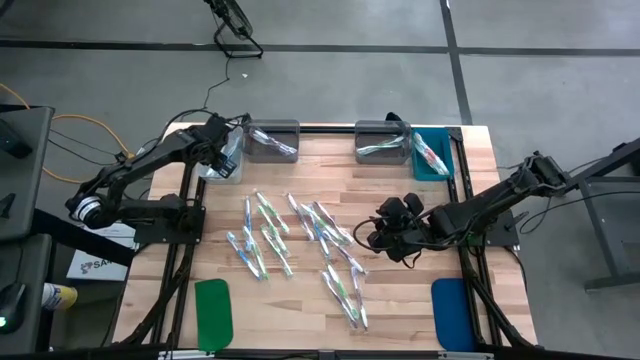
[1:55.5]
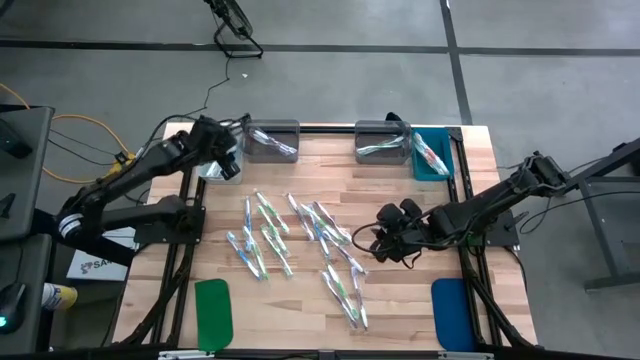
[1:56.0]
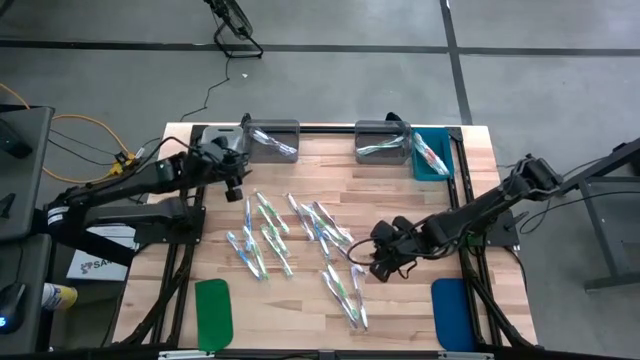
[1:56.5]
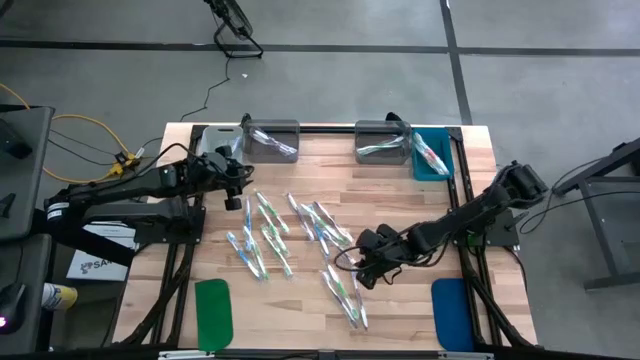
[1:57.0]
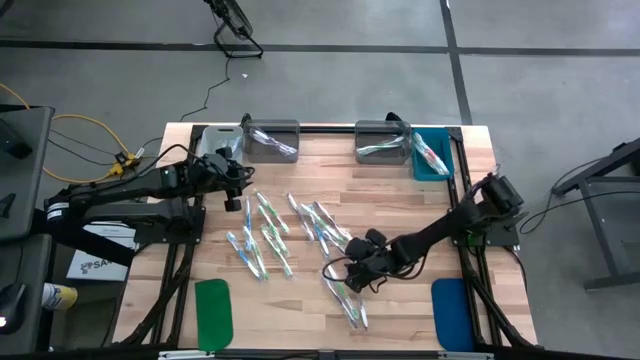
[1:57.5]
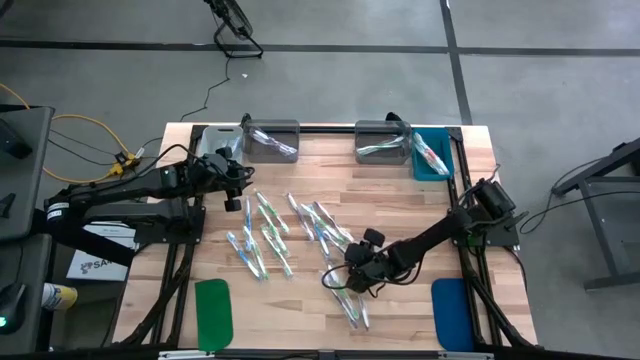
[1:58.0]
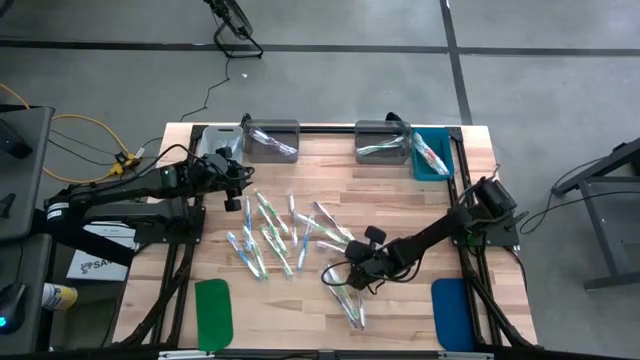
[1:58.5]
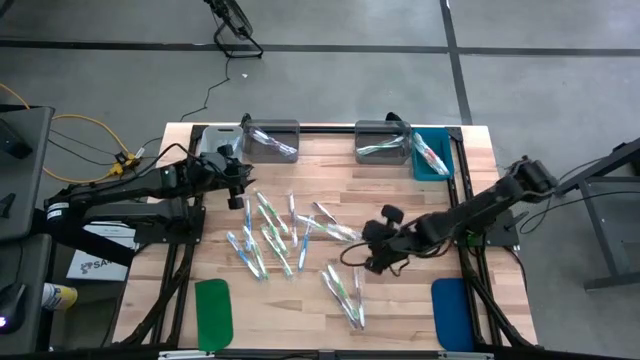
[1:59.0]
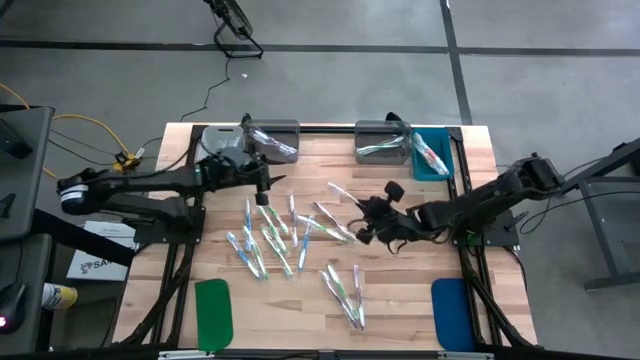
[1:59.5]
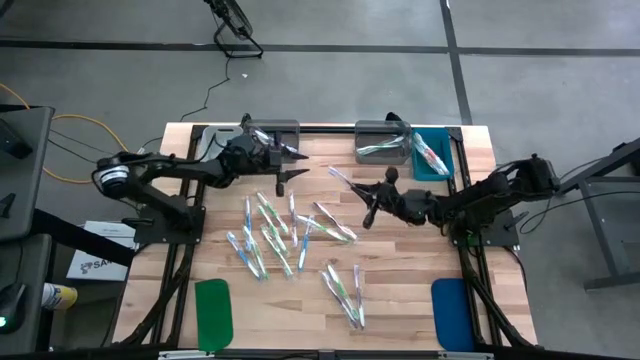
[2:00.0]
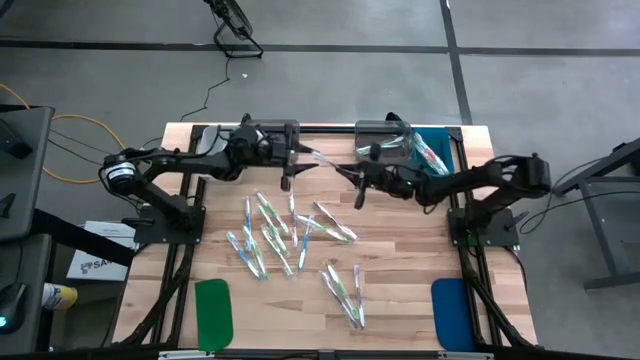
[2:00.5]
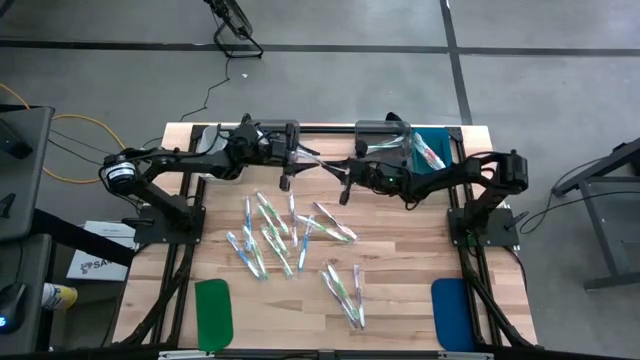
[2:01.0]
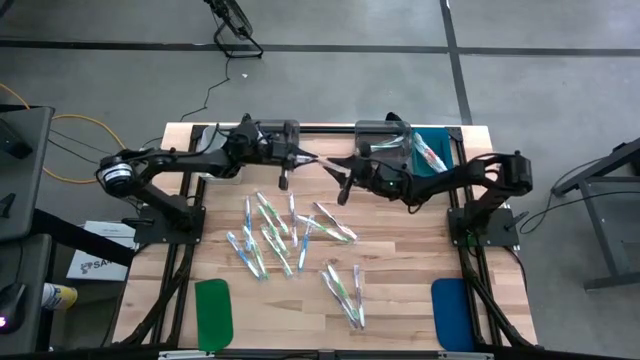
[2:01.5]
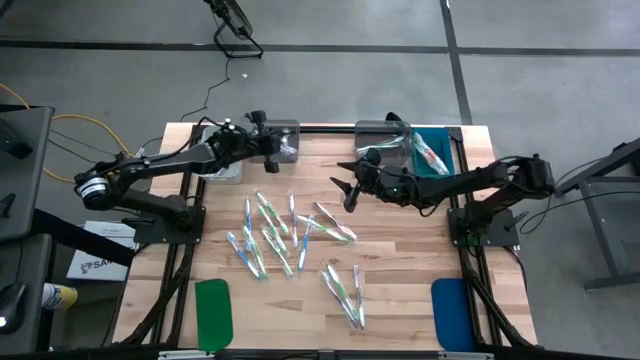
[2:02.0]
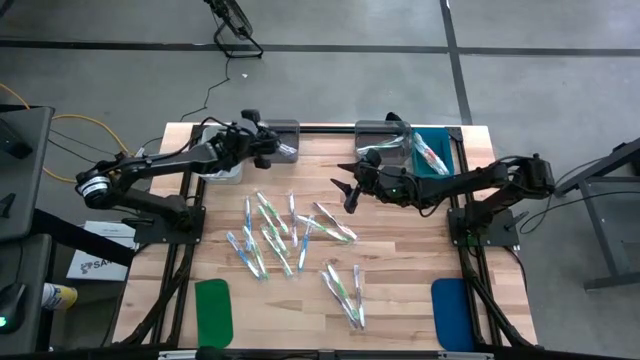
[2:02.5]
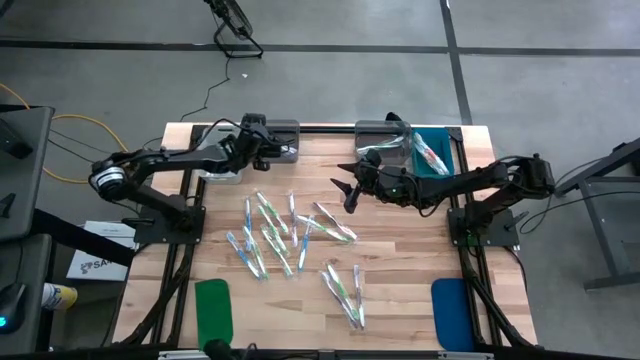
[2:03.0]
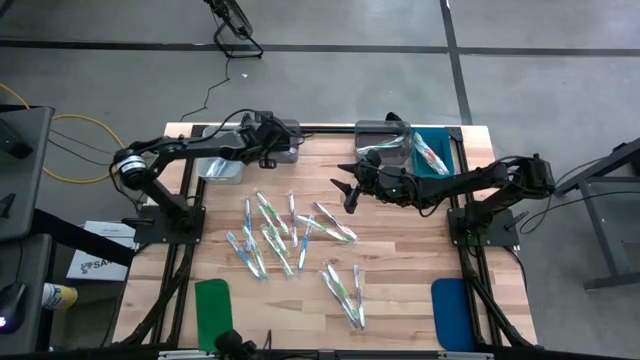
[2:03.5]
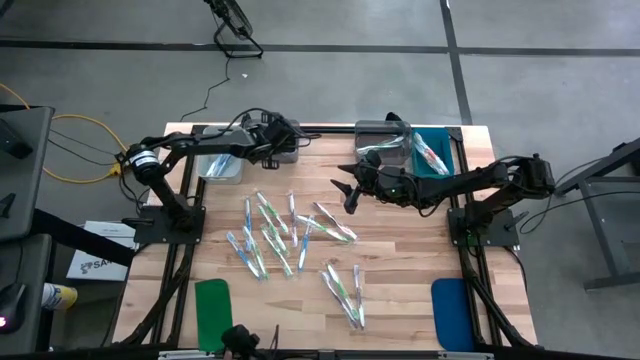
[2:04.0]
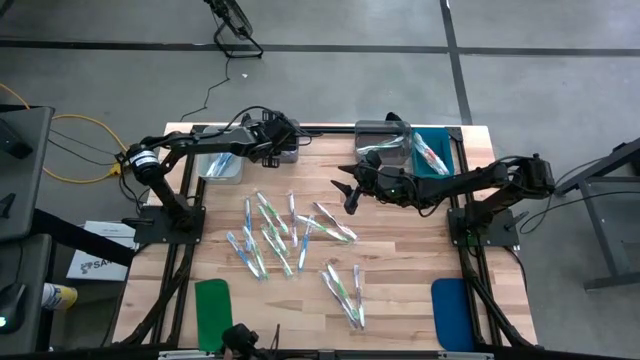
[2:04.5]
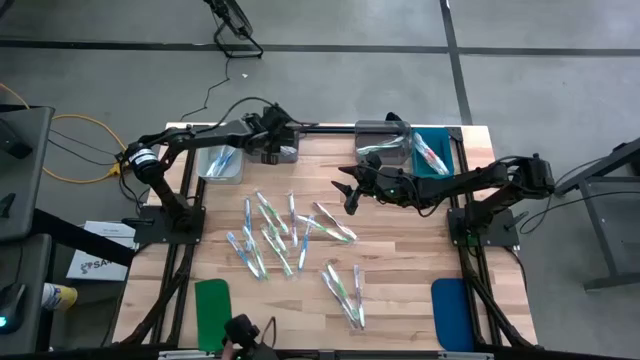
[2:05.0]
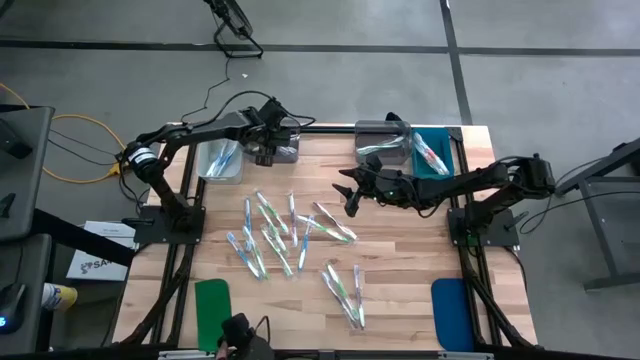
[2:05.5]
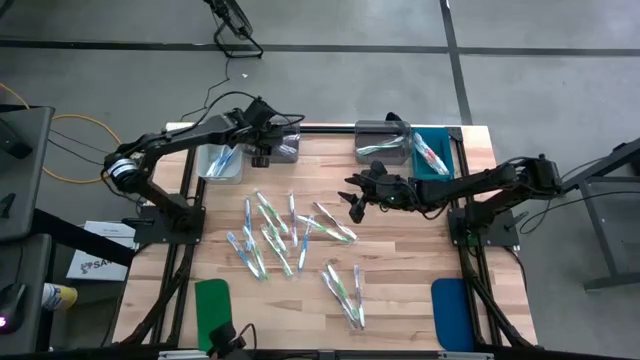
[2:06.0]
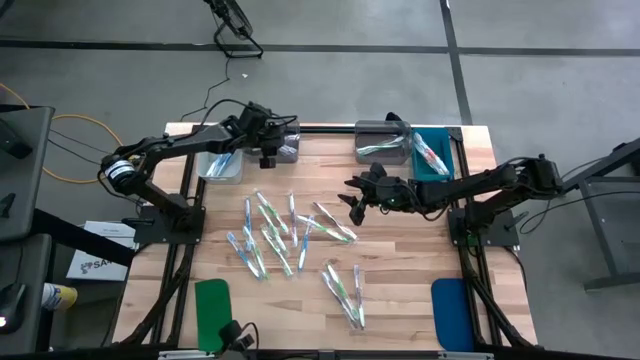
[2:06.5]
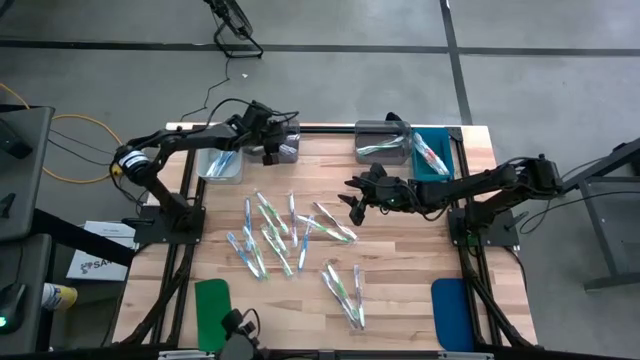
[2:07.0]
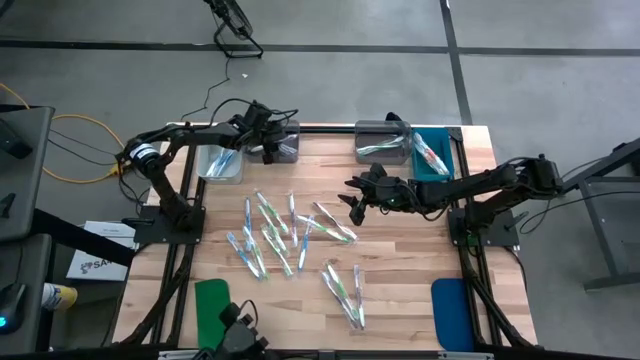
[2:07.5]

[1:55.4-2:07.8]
Task: Pick & Place Toothbrushes
Put the violet toothbrush into the left black bin

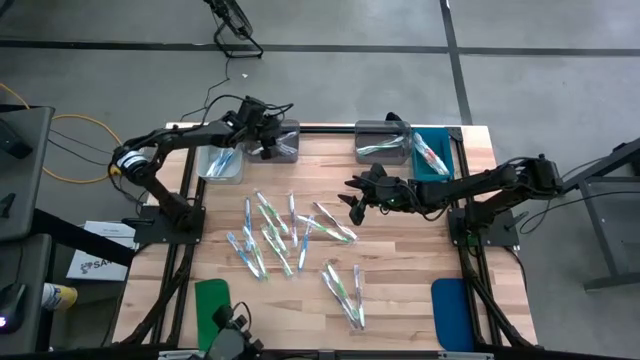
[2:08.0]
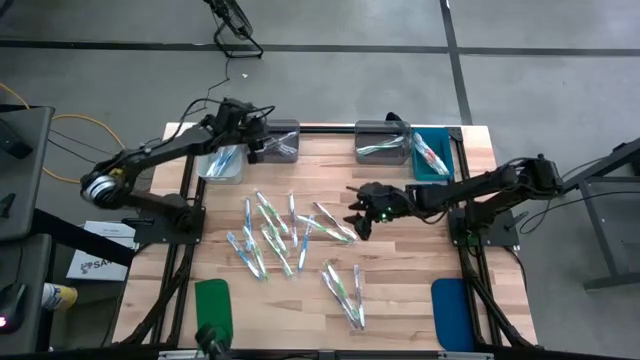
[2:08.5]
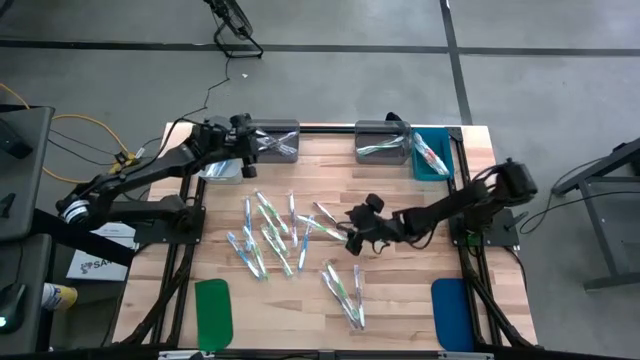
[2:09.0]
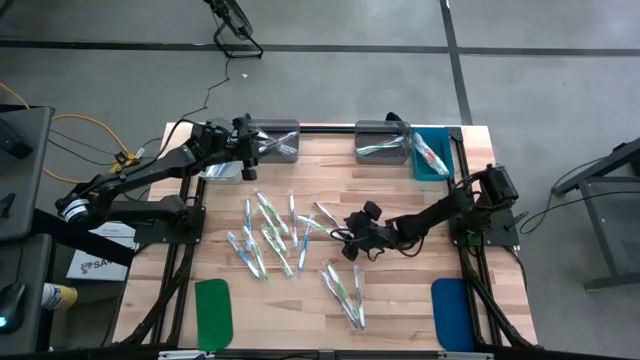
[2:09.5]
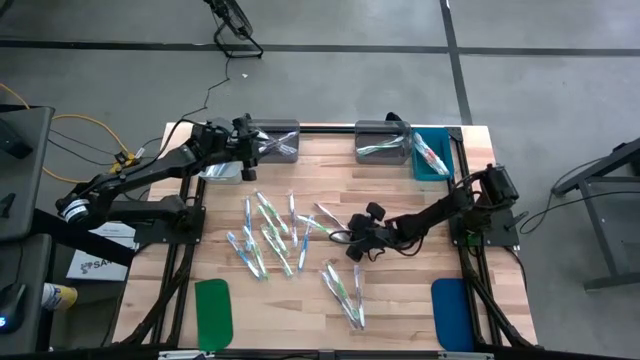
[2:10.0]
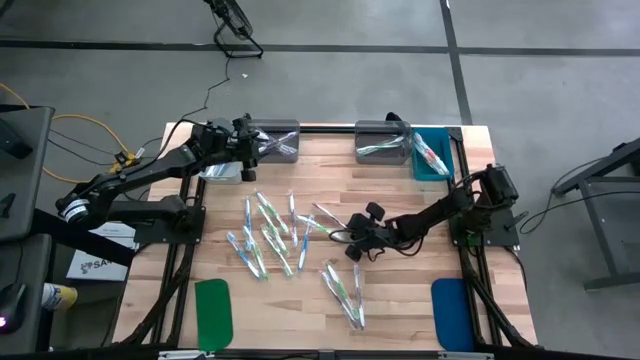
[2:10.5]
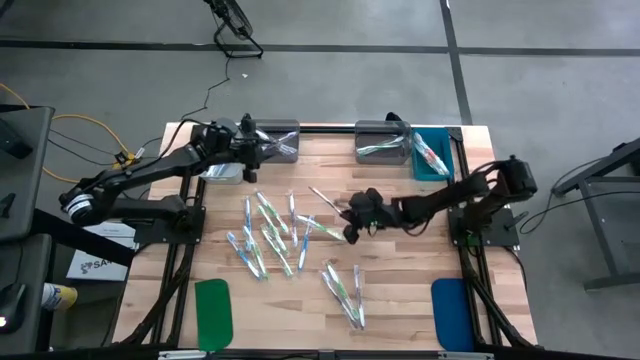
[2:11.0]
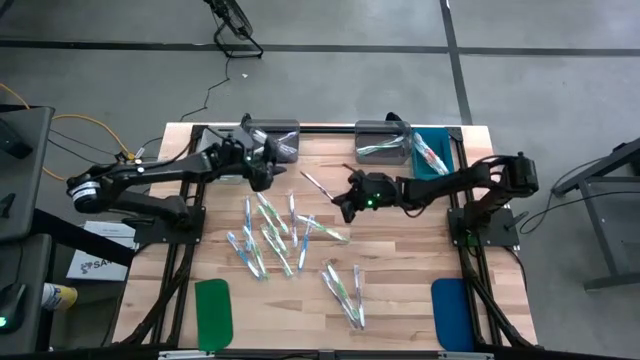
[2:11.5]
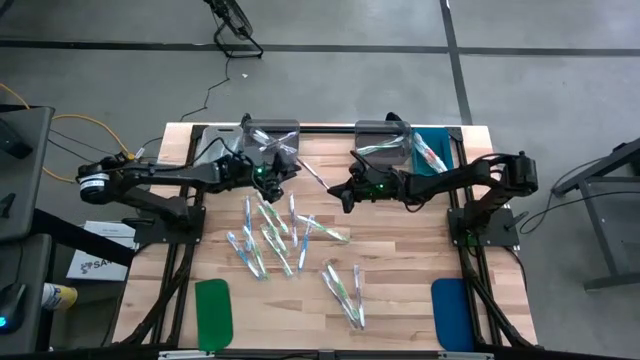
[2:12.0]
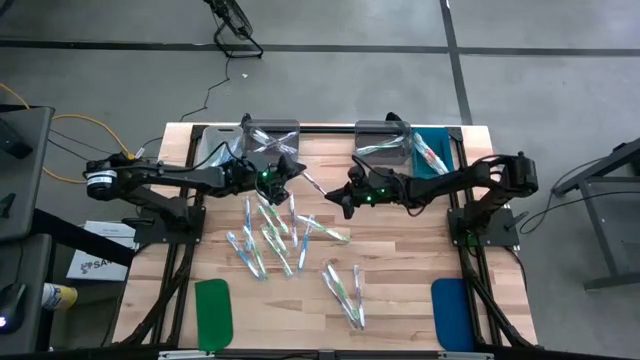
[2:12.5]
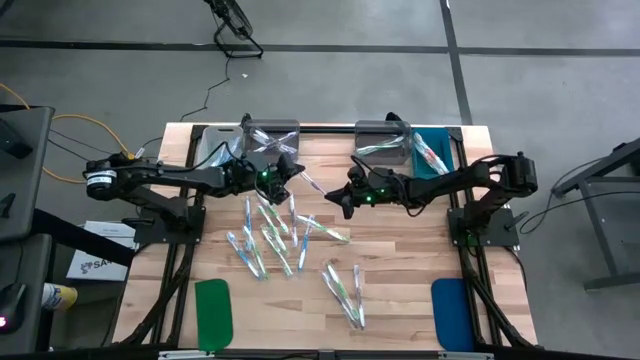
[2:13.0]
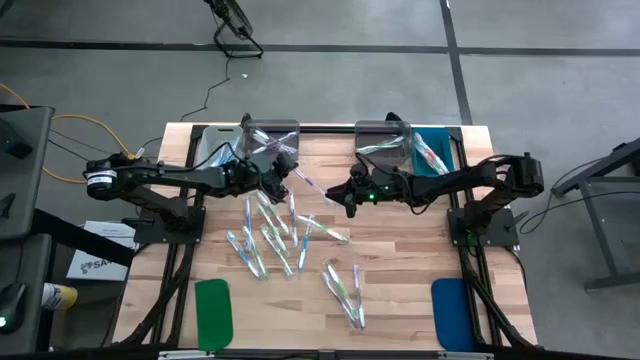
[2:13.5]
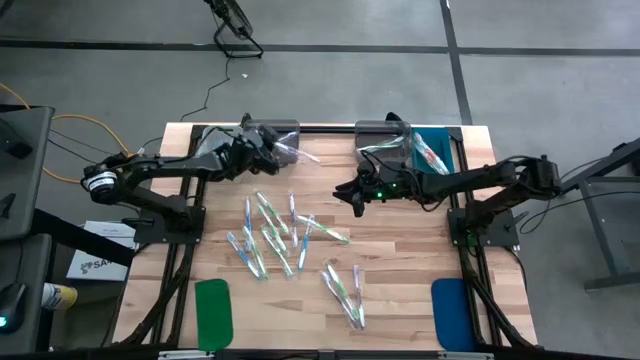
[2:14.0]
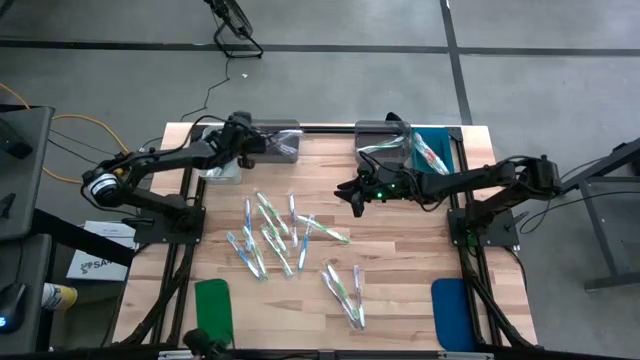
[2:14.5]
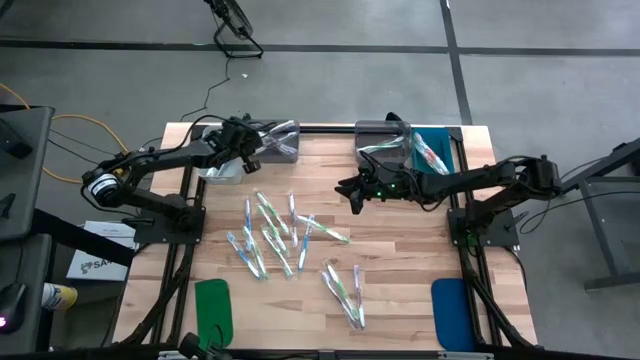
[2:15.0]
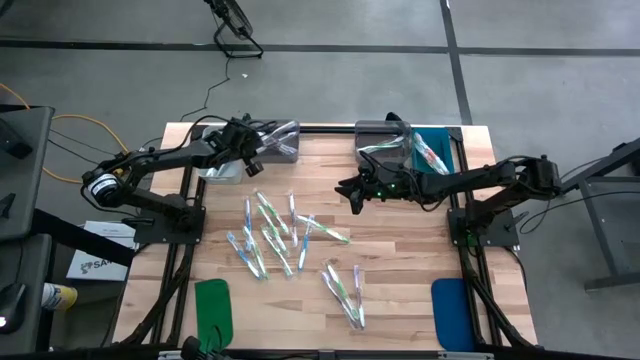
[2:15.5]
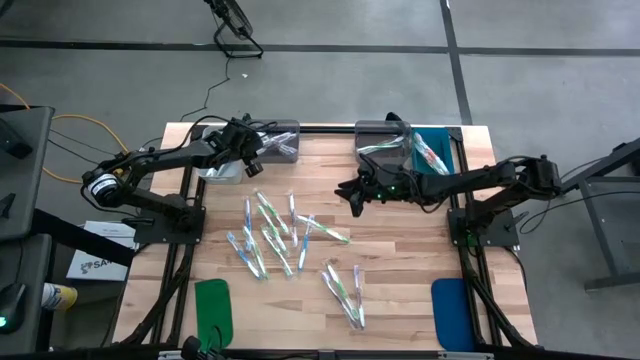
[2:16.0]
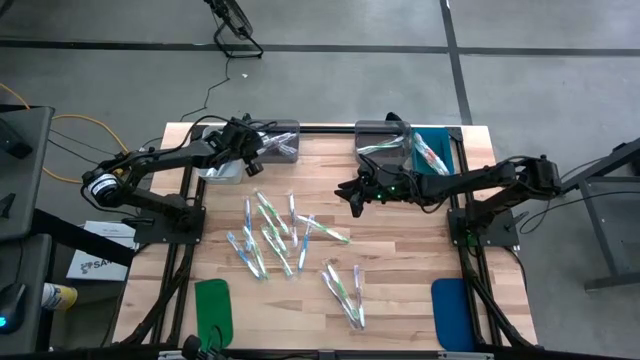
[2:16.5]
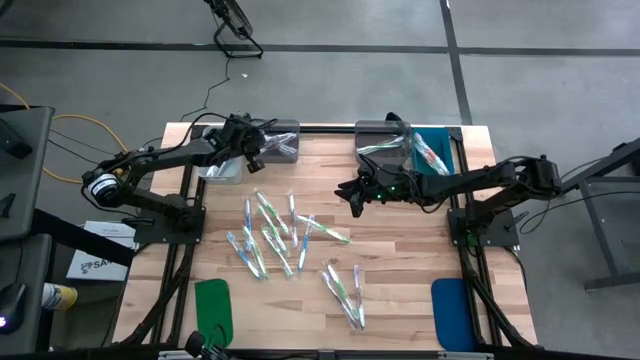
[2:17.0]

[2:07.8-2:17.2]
Put the violet toothbrush into the left black bin
